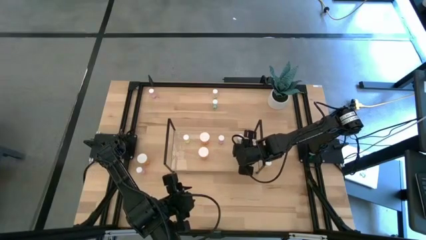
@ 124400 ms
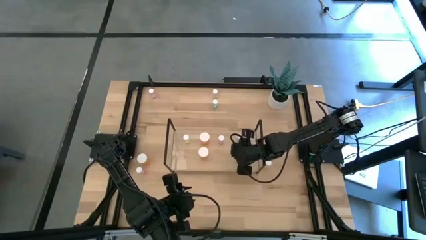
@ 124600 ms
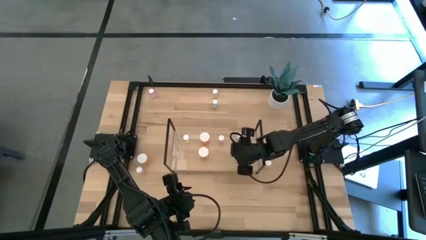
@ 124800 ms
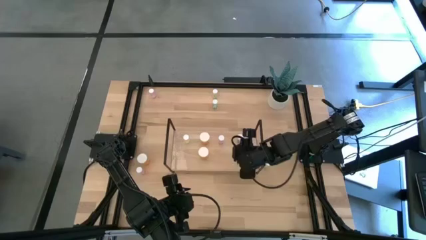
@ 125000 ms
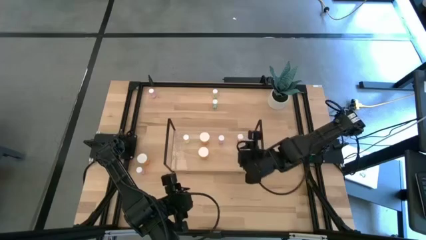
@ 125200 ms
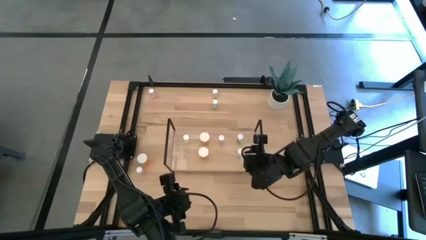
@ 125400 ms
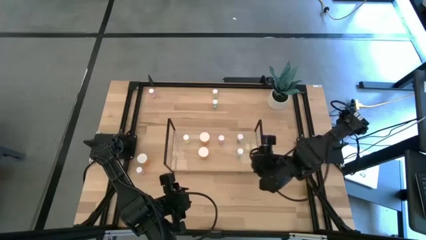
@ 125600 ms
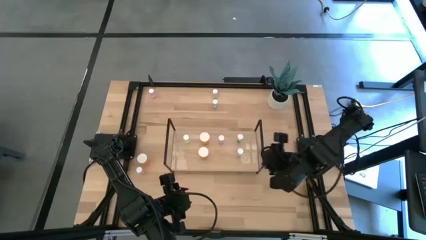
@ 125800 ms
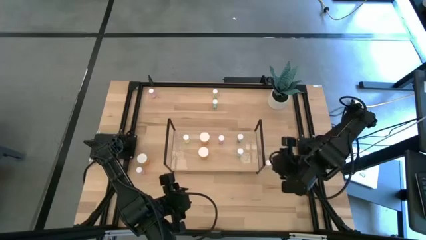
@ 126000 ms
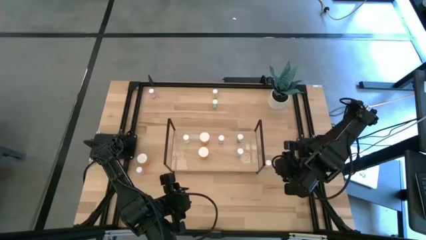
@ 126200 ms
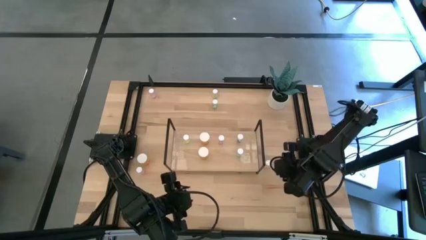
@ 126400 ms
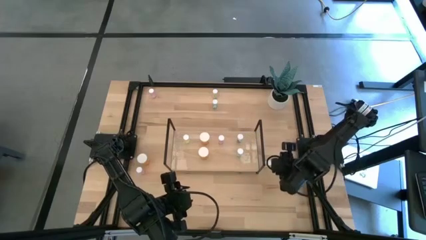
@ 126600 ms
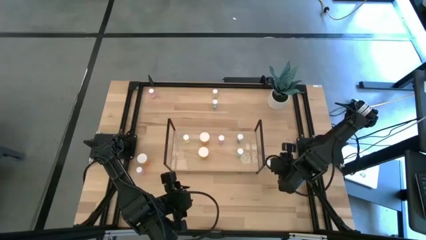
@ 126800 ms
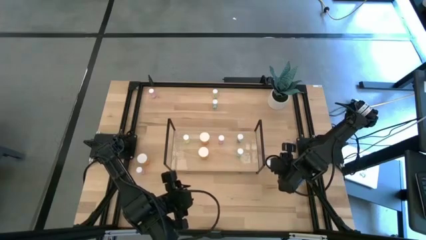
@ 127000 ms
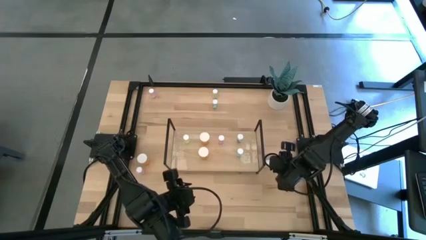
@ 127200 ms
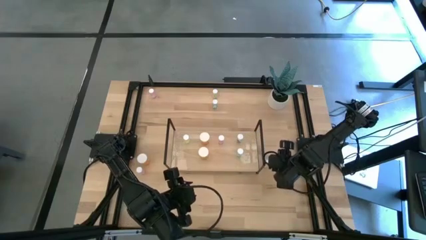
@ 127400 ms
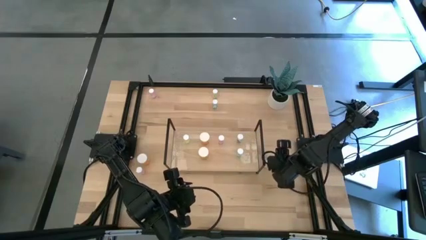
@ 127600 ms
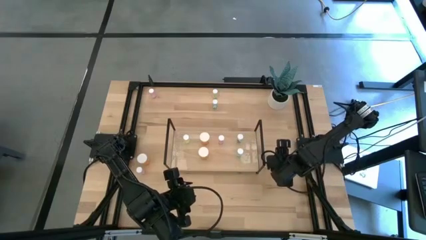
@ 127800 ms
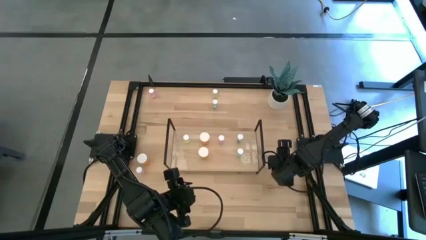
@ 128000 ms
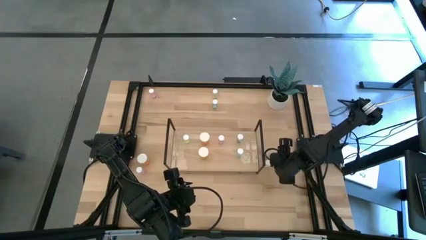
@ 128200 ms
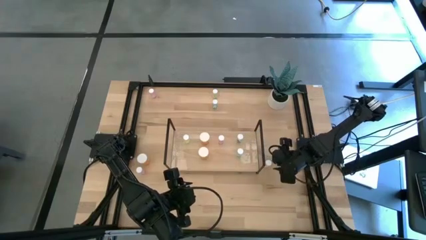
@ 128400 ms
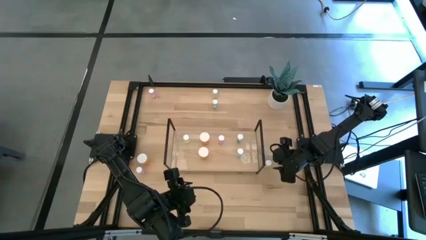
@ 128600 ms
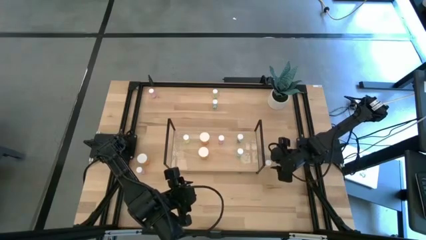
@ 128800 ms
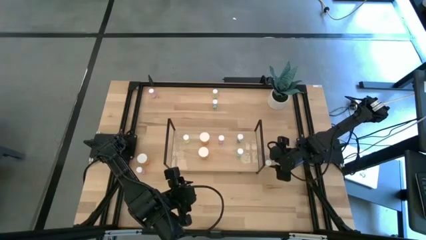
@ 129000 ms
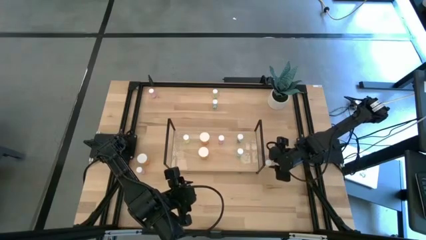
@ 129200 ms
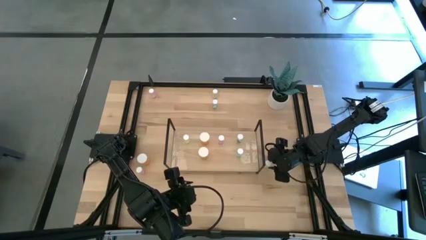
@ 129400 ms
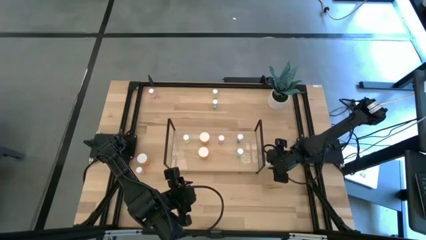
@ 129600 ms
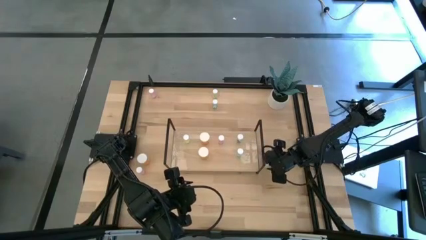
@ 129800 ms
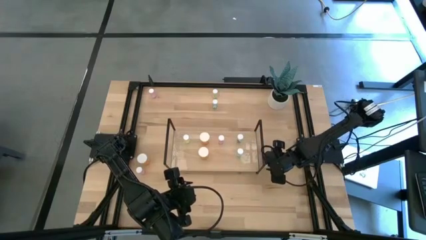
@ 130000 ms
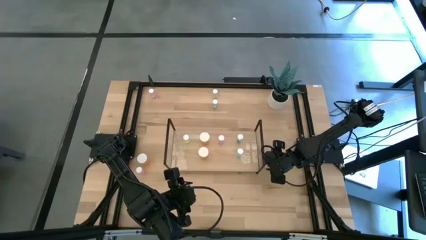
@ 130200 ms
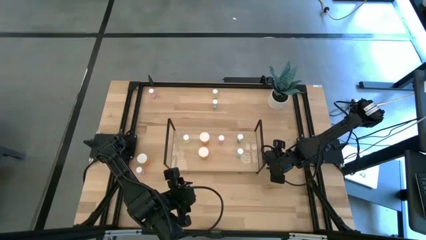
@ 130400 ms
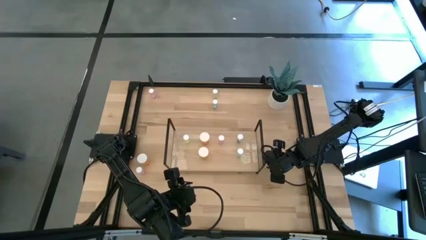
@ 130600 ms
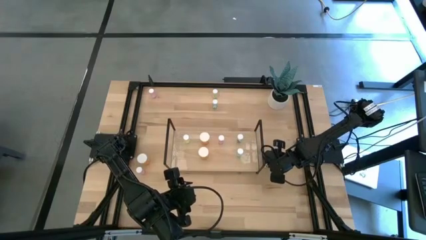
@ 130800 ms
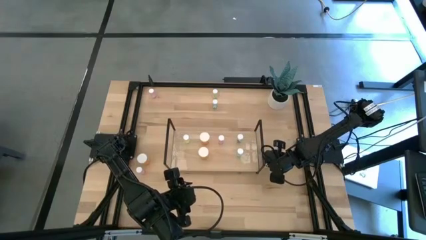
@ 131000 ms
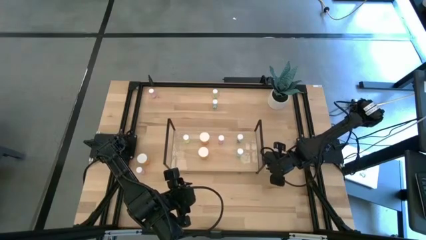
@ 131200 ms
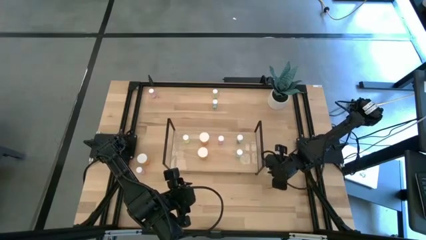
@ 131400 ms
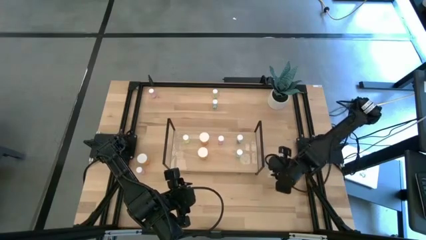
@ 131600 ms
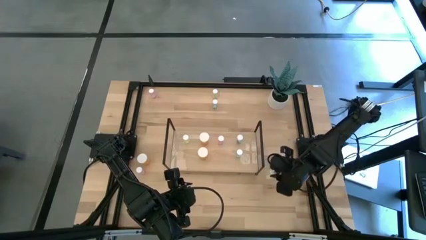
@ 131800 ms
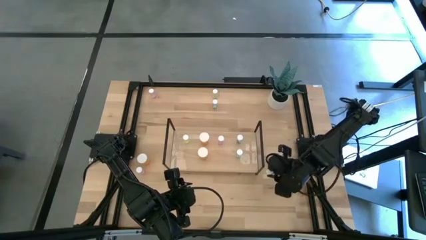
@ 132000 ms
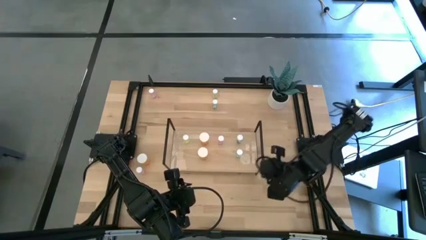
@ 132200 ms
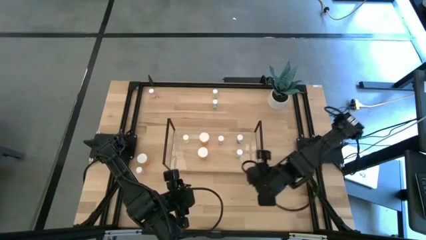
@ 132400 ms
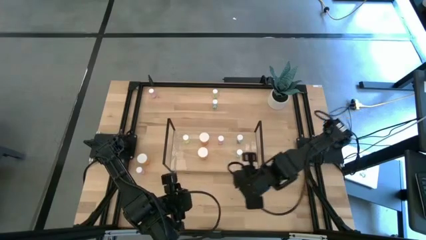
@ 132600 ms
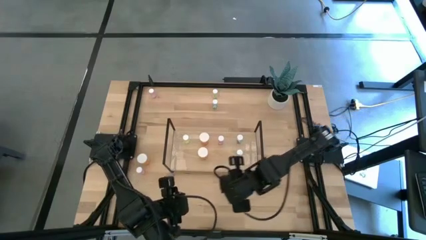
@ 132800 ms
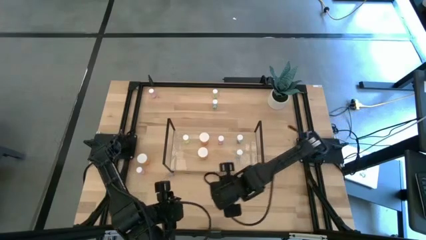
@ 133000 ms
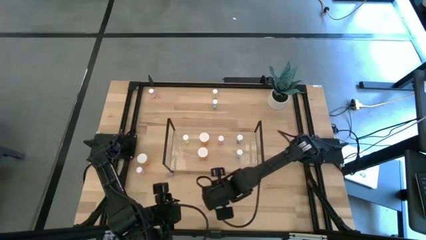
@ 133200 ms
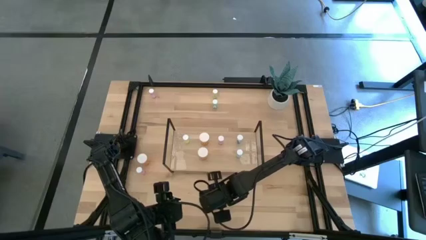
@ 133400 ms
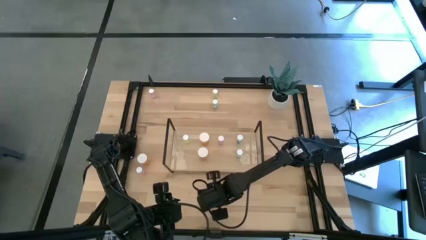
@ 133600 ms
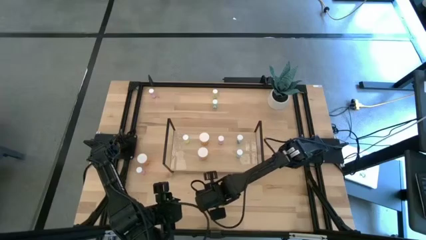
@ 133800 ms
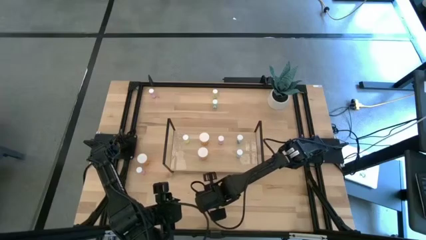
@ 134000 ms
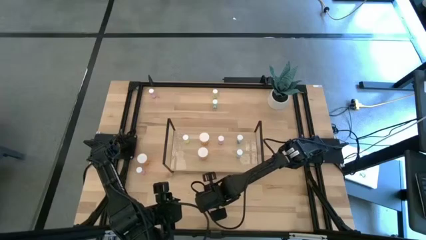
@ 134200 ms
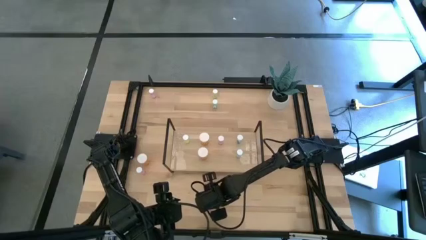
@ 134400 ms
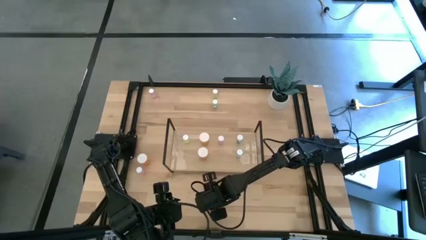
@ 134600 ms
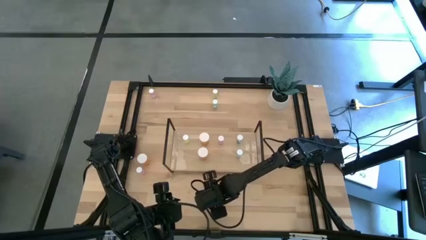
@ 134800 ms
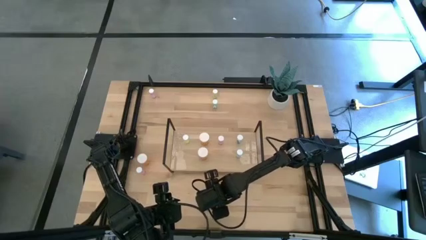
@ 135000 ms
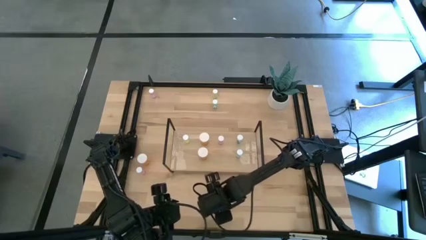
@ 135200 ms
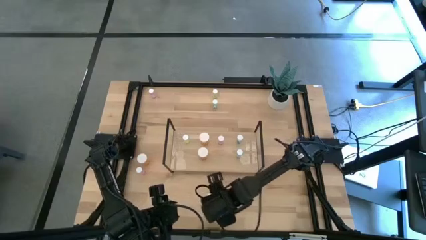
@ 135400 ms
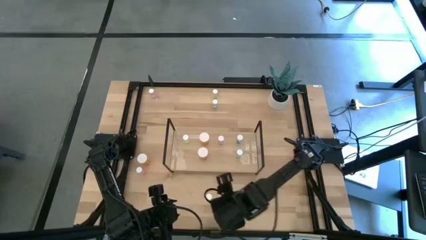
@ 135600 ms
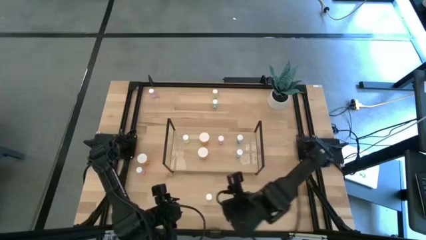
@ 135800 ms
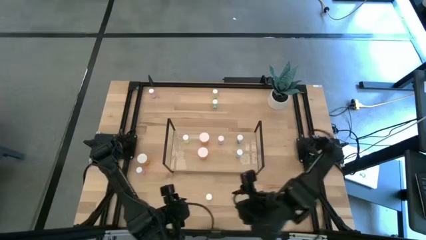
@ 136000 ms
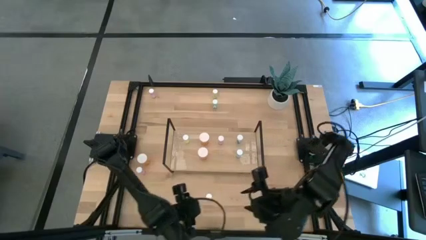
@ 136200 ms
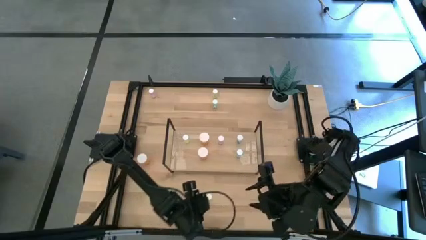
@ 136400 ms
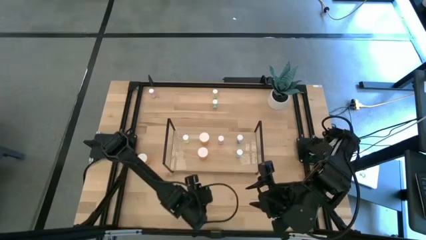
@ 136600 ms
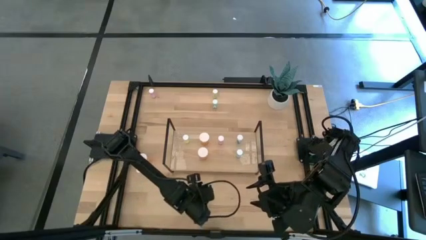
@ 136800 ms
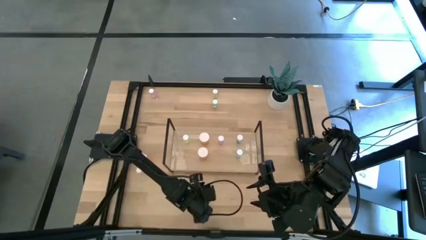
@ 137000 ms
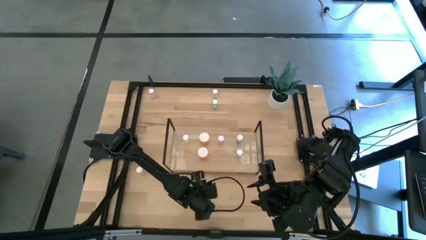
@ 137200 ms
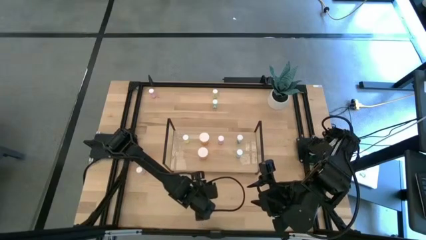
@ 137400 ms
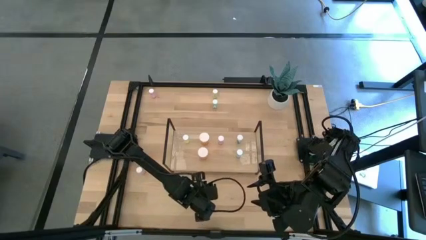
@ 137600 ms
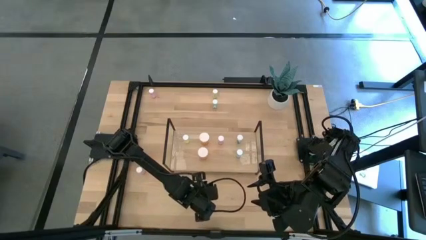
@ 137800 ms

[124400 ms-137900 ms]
Task: Pick and place medicine bottles onto shelf by color
Put the right yellow pill bottle aligned with the yellow pill bottle on the shelf

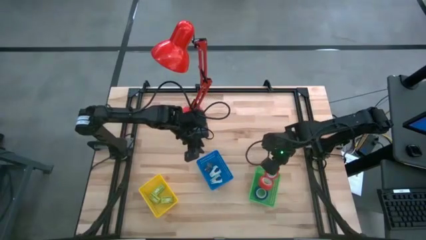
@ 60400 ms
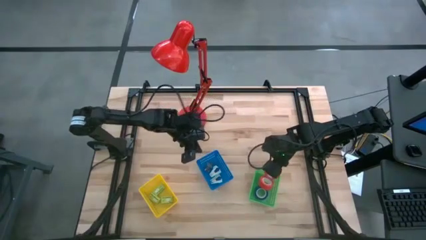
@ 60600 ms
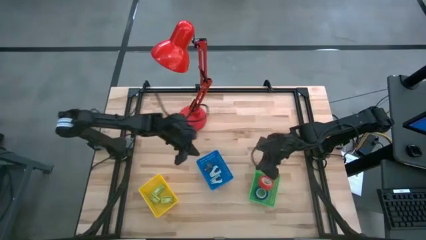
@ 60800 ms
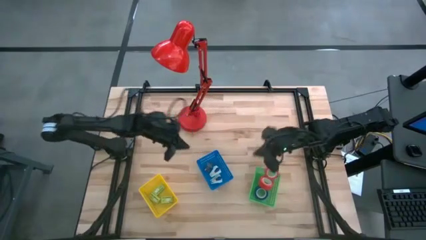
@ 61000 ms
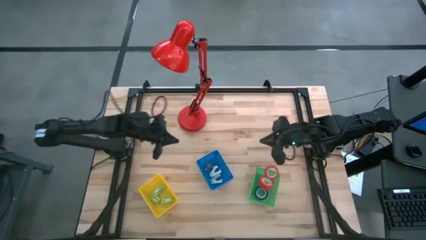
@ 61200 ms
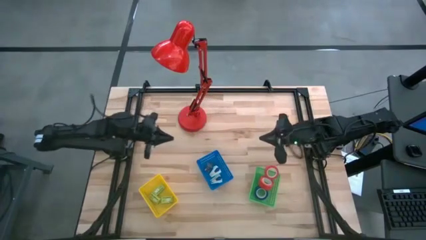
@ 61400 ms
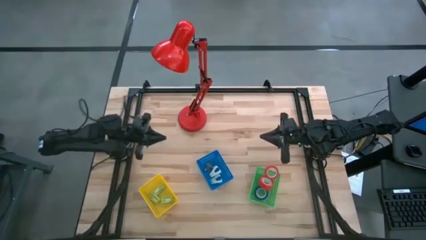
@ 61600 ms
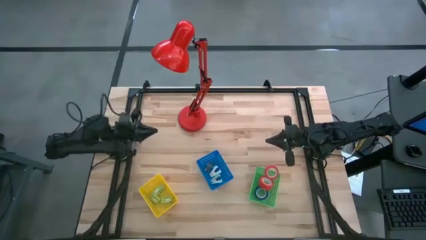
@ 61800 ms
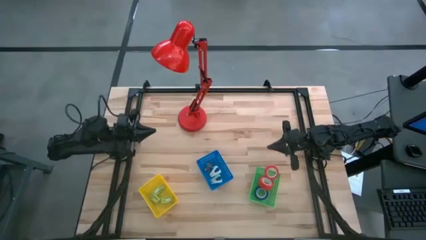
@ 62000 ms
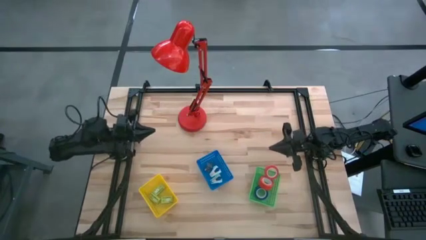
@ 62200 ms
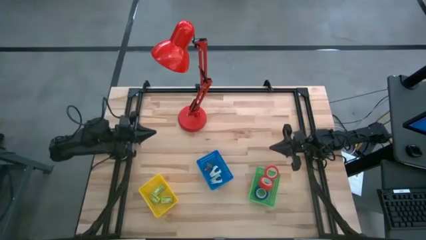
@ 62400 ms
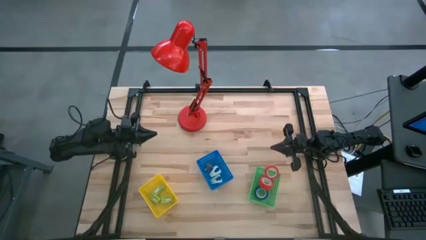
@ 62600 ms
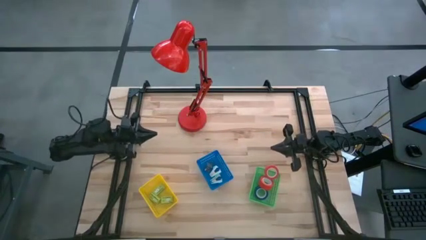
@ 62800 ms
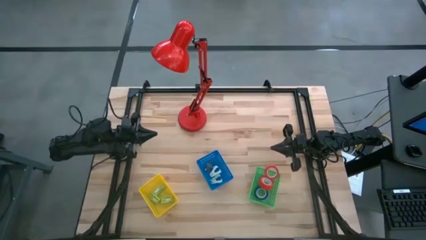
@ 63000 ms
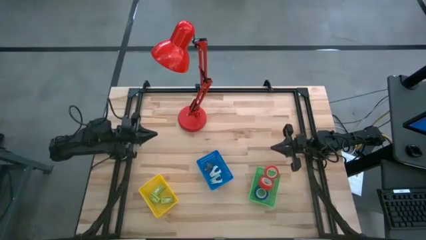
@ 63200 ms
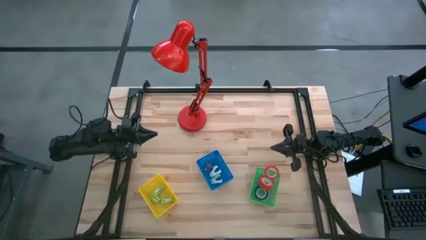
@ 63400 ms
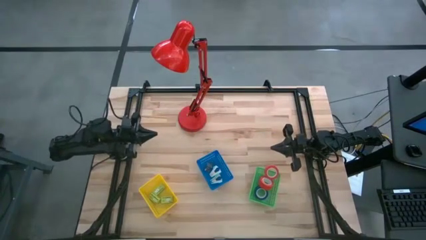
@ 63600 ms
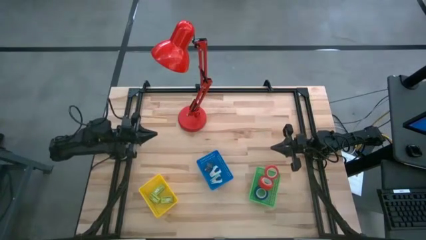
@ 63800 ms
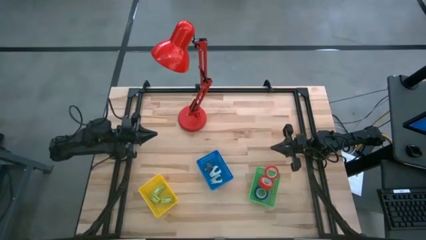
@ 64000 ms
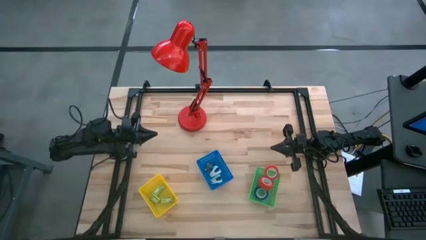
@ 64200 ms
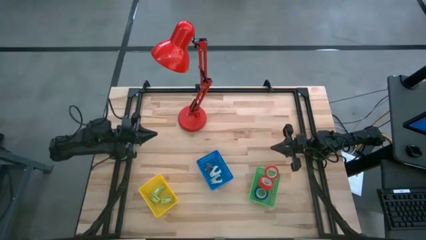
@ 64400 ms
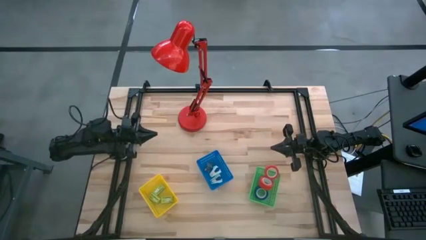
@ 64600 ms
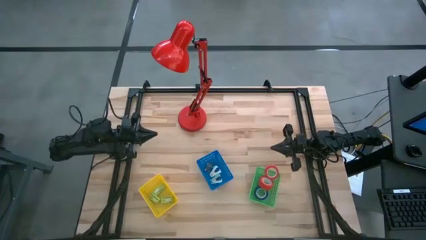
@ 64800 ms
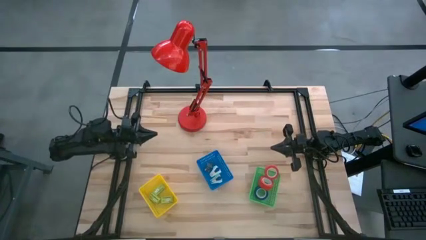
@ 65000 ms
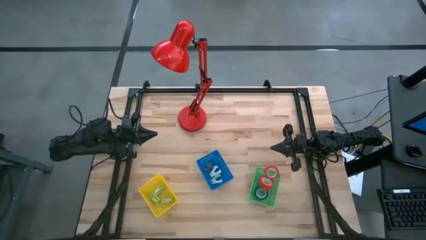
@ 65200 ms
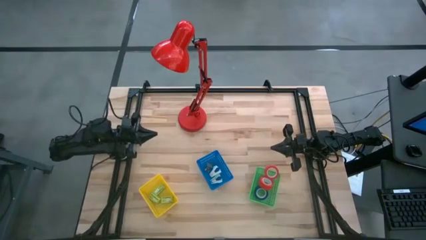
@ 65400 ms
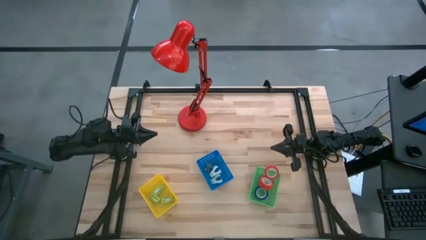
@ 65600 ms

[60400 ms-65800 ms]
Task: Pick and place Stapler, Stapler remover, tape
Return to Home Position
